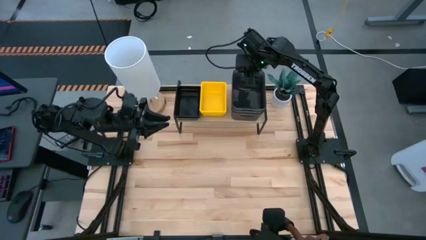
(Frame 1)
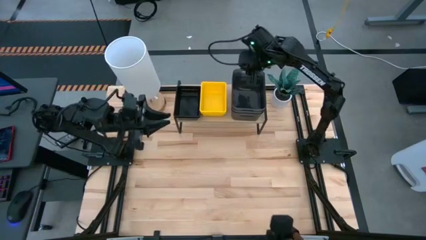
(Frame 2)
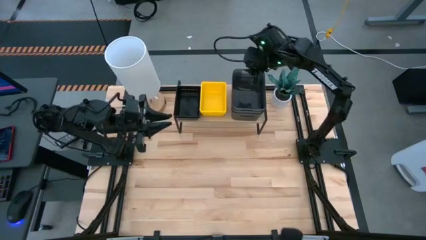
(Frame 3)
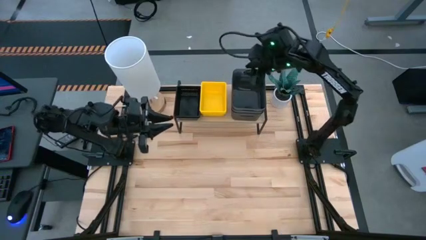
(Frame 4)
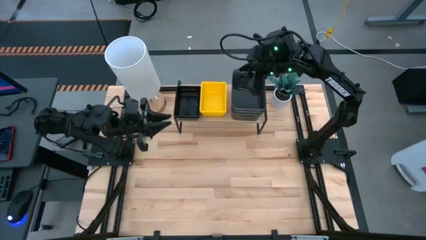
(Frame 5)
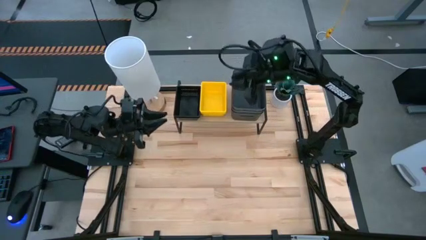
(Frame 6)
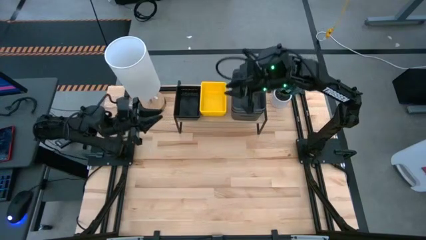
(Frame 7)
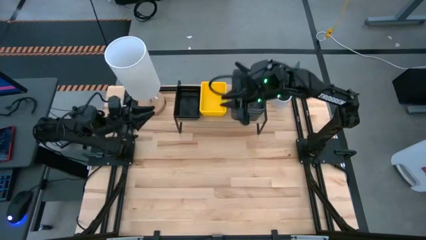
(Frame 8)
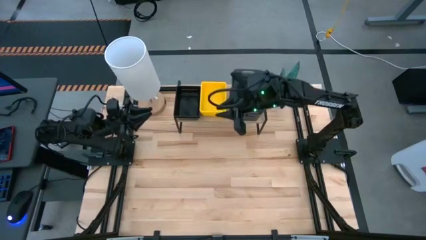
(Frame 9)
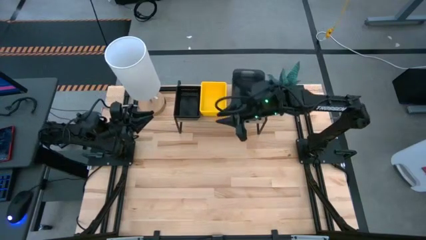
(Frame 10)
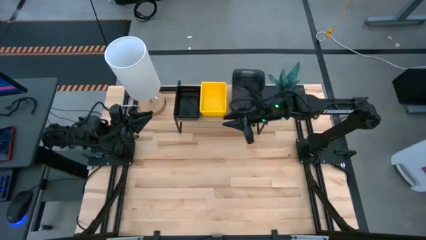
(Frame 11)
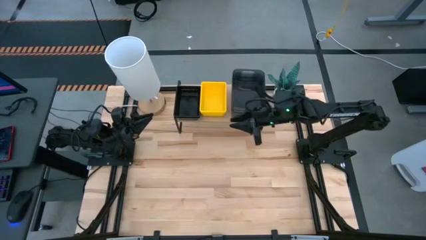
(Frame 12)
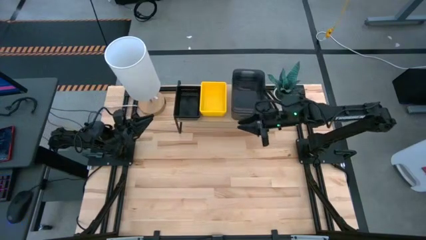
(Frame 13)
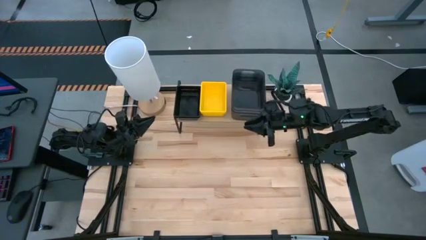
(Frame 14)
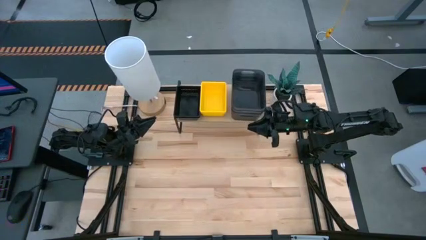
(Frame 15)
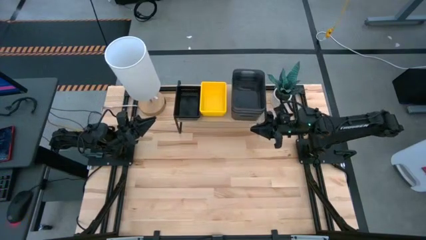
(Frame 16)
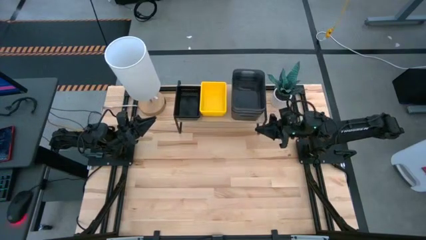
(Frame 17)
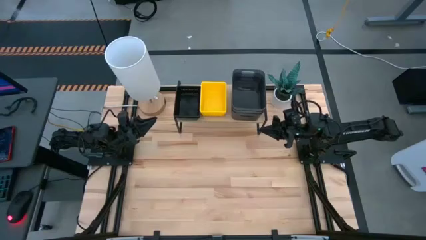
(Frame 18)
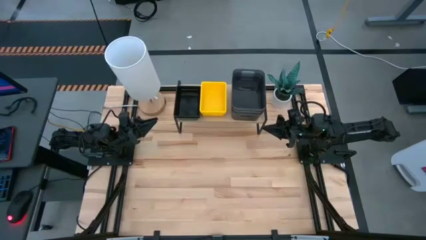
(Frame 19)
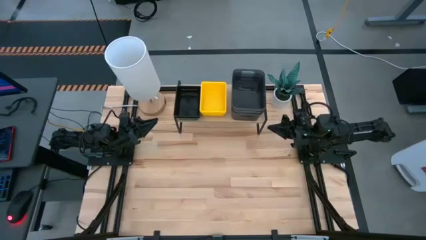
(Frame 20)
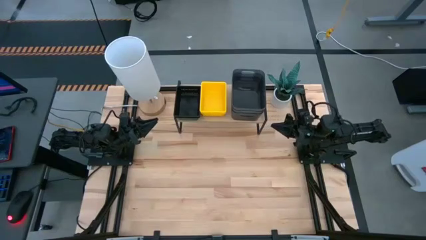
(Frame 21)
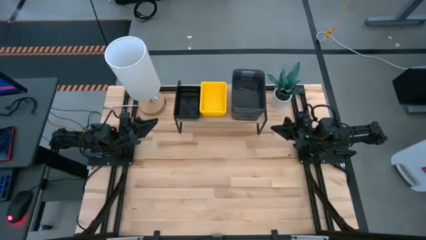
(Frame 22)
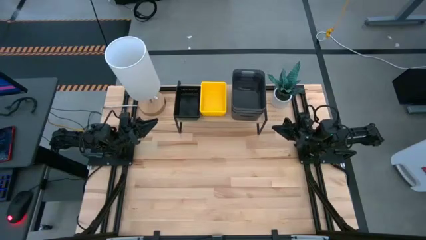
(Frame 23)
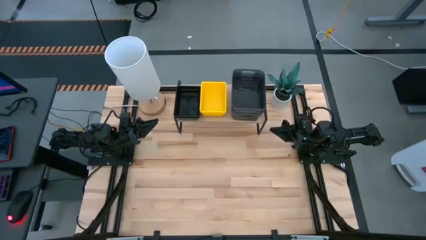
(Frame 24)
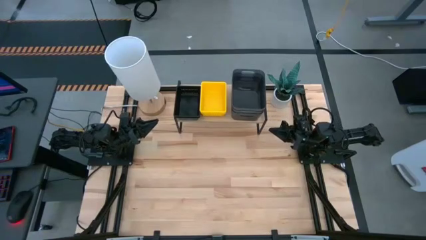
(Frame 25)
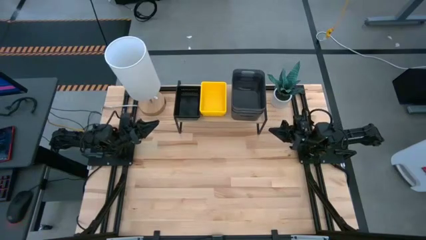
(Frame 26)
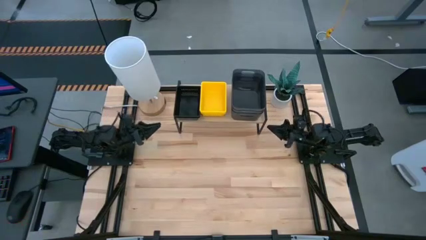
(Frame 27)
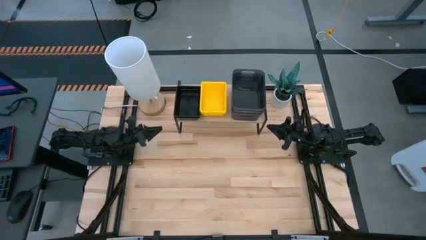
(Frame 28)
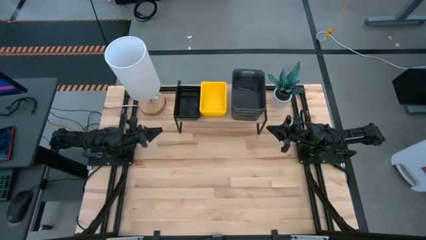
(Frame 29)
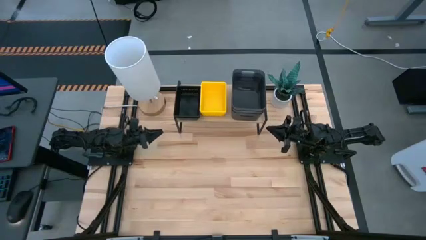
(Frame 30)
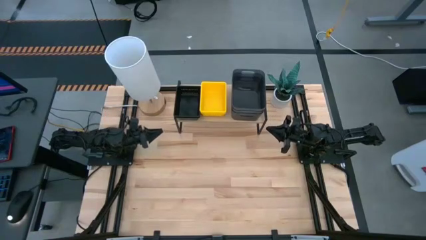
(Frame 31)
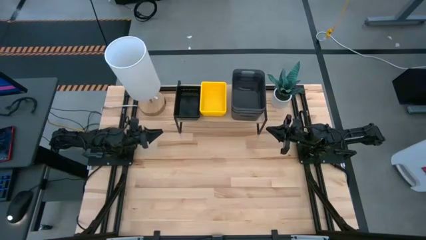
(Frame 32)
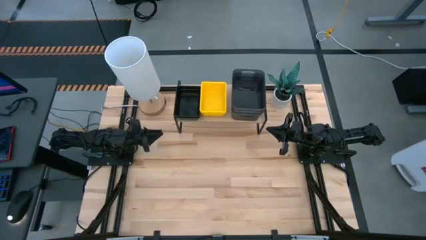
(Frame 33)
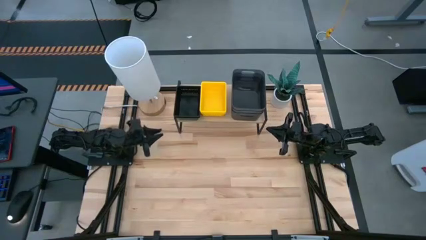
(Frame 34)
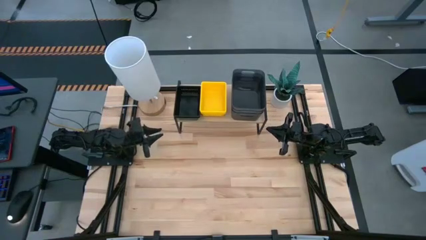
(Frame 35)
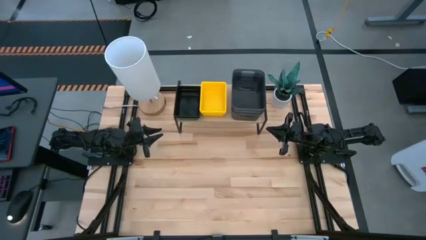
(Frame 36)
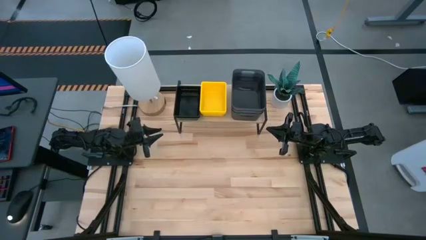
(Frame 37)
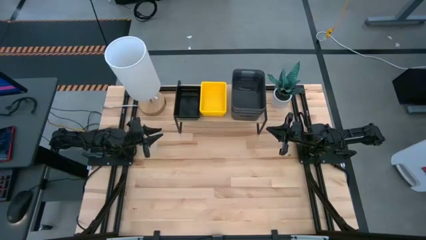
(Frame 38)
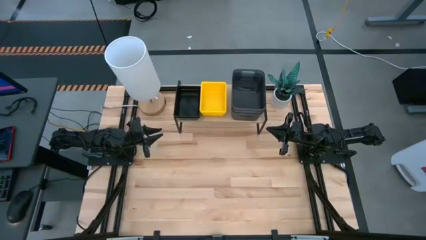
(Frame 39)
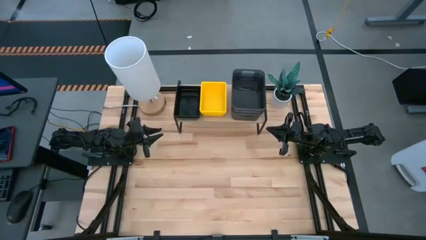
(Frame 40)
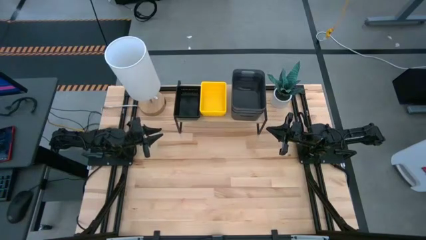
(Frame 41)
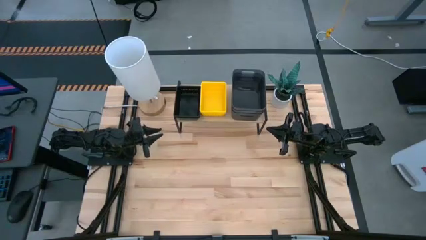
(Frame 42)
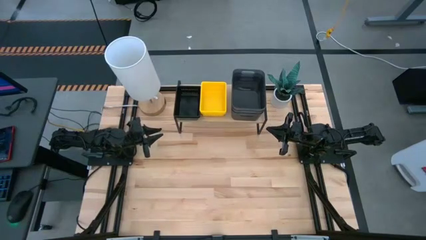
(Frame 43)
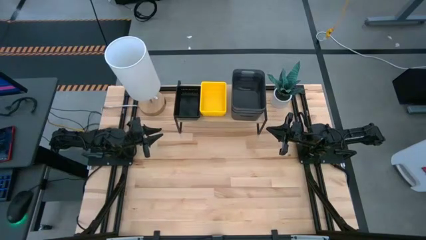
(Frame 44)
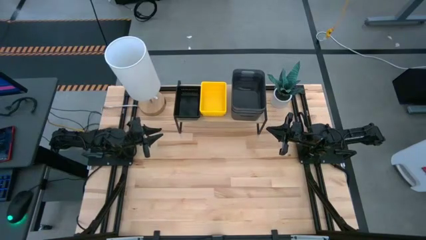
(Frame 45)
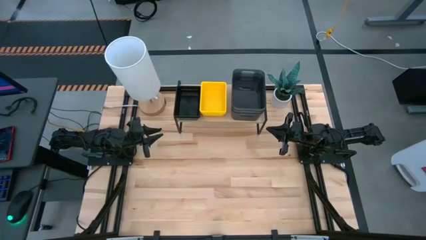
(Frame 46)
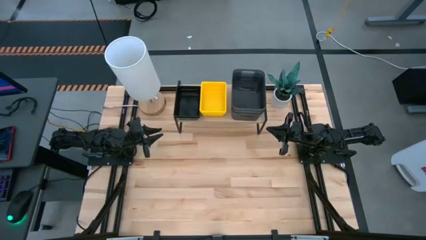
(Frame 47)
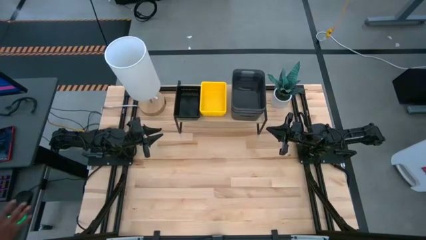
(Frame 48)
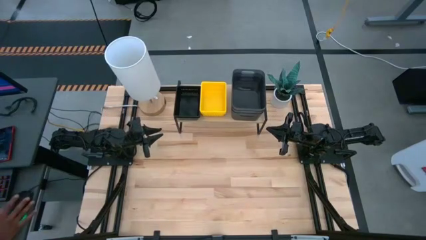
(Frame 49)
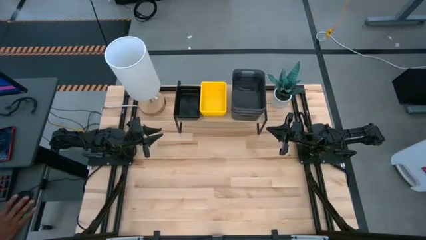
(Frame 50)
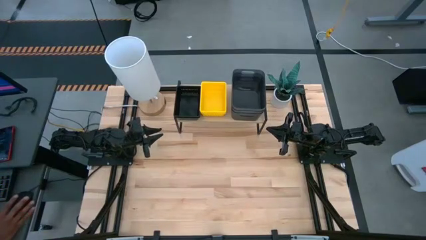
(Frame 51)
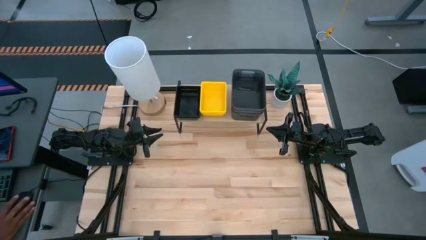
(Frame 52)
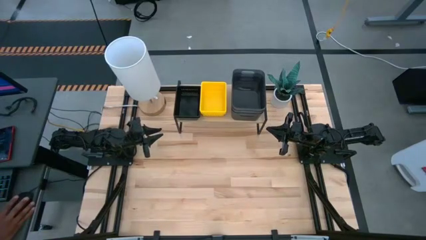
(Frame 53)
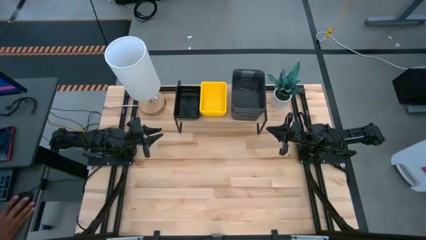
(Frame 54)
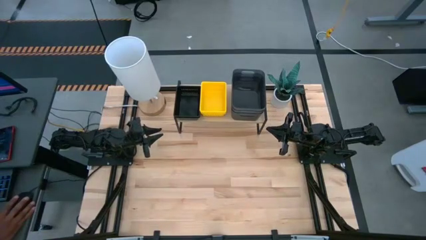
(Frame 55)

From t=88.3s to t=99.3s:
Task: Stack baskets on shelf by color
Return to Home Position

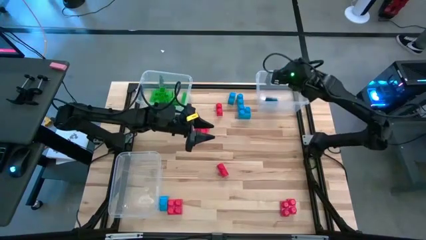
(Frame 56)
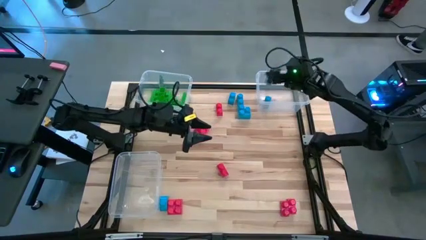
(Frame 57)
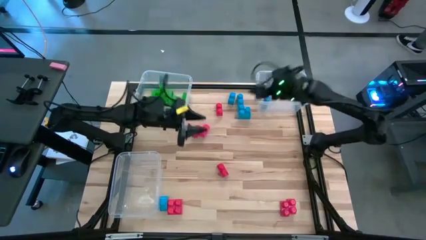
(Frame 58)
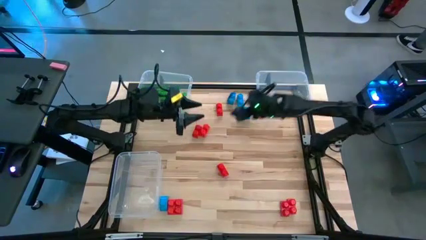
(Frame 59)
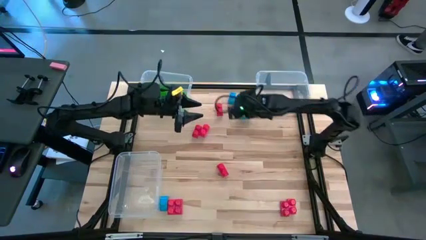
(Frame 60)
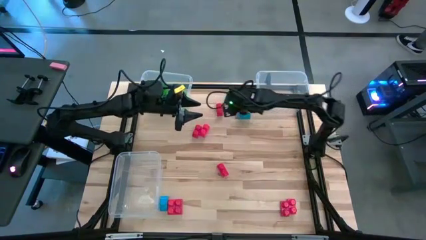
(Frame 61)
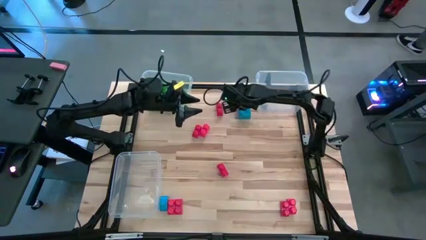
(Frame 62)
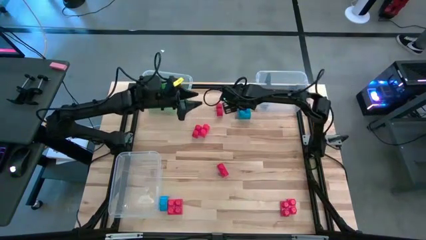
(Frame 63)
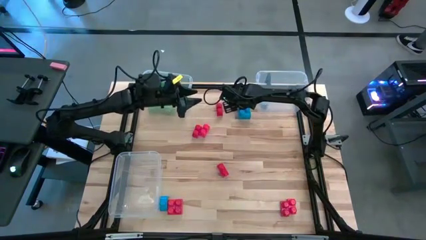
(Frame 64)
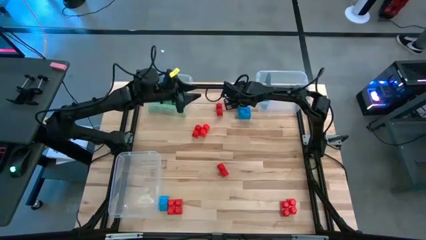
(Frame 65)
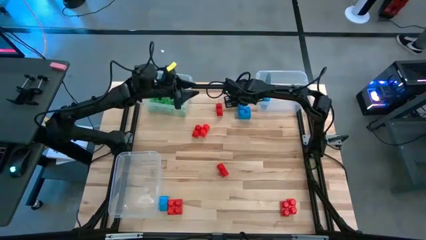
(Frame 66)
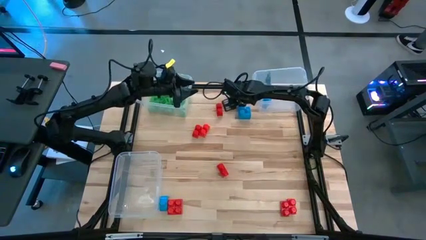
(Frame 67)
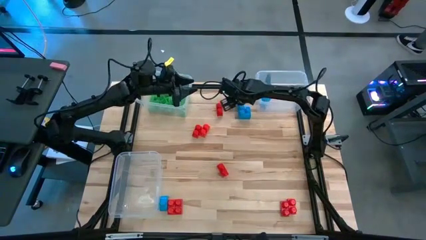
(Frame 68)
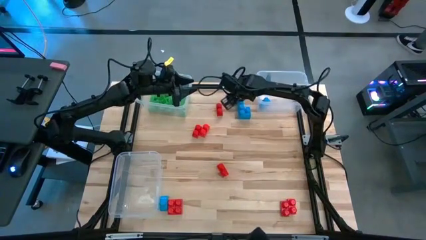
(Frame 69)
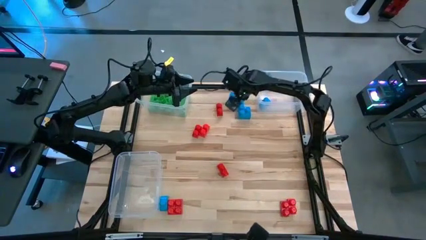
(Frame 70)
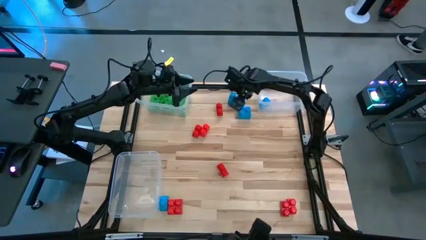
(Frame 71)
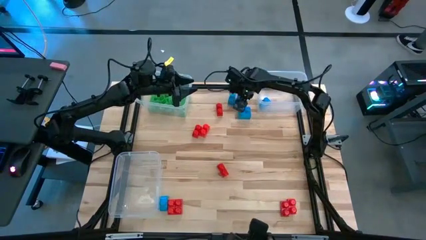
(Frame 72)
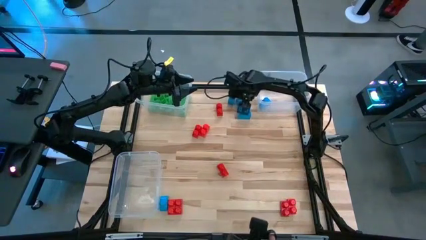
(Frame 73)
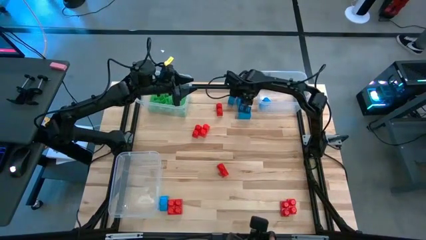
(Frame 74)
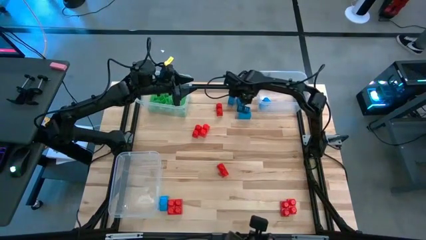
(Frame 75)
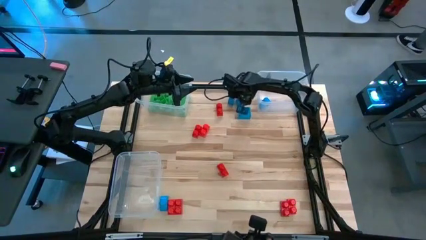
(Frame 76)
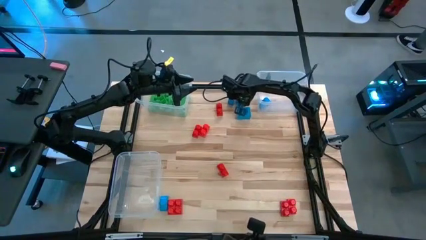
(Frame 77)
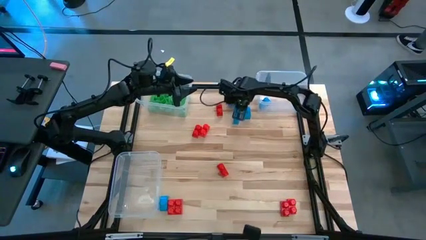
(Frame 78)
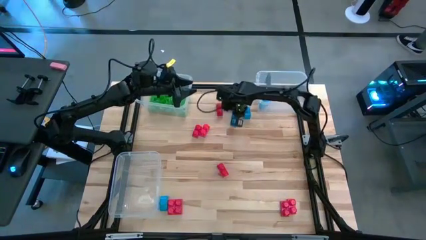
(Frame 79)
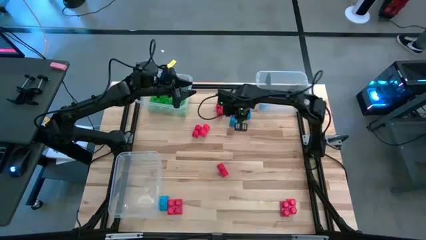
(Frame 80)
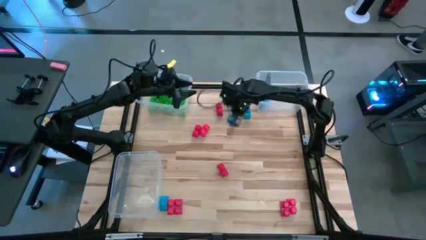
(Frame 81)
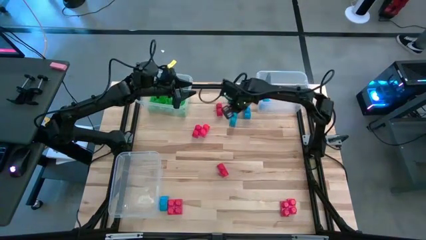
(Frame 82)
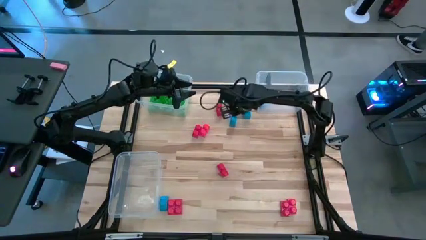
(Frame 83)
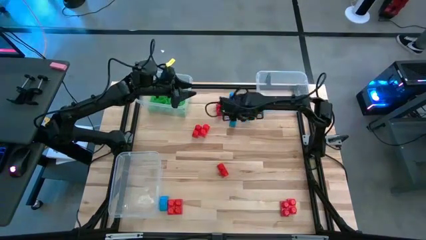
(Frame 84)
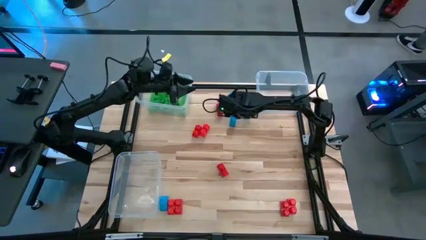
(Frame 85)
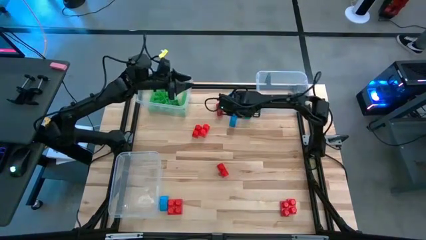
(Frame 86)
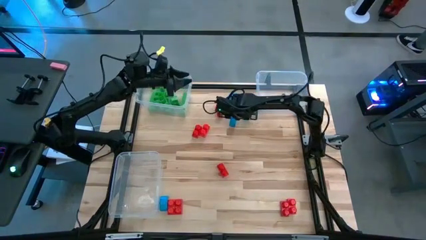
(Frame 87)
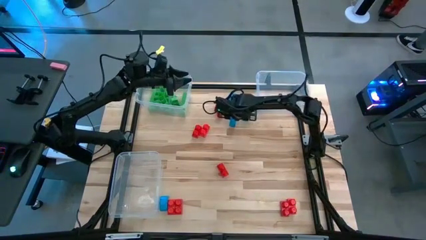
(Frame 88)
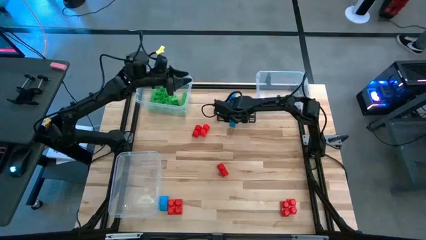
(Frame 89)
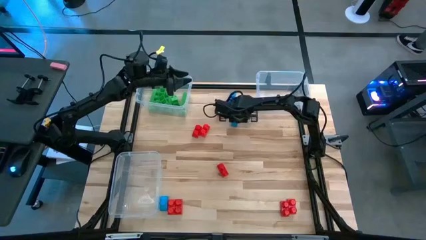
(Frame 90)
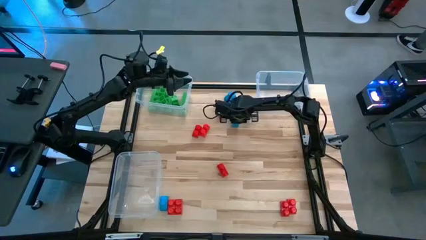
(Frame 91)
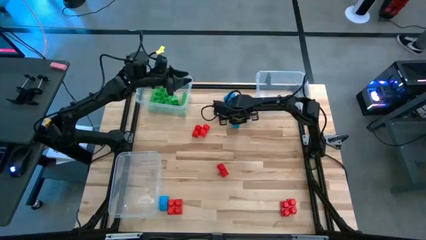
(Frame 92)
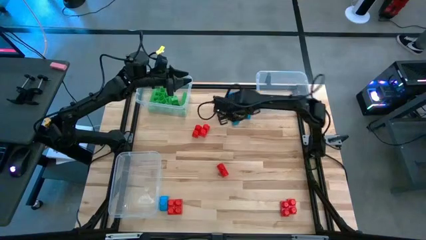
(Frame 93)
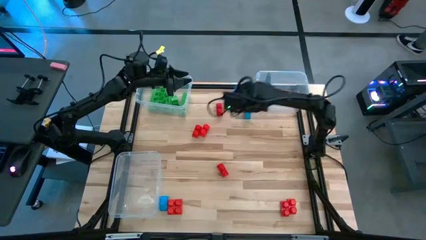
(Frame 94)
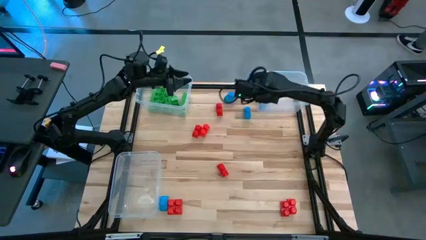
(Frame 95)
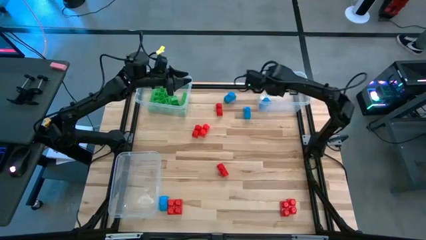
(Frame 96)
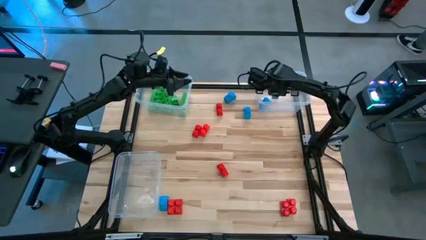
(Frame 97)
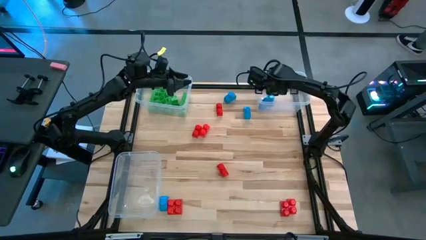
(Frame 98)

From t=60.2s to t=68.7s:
Task: Sort blocks
Put the blue game piece into the top right transparent bin
